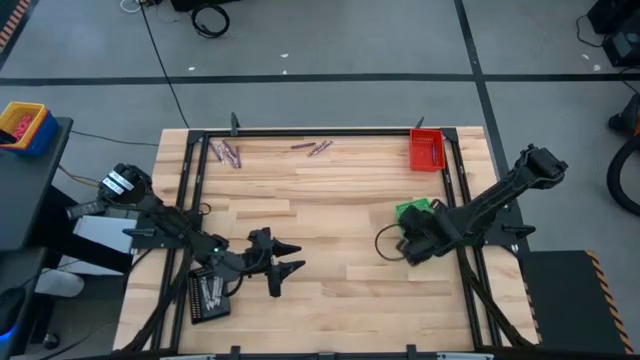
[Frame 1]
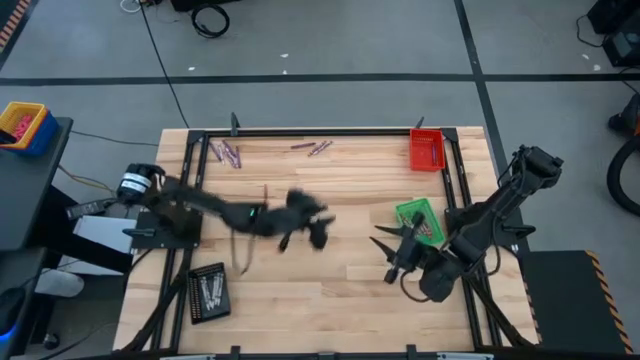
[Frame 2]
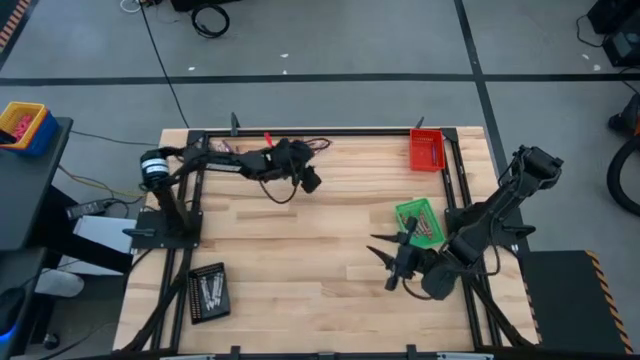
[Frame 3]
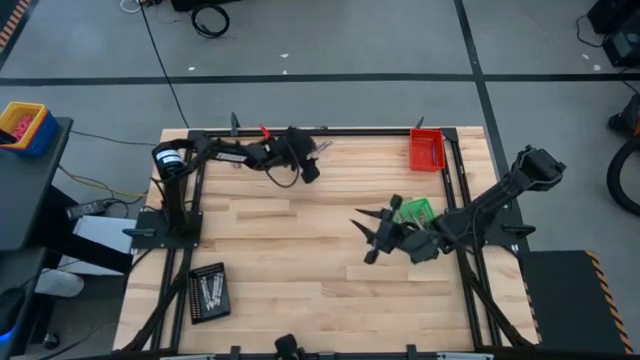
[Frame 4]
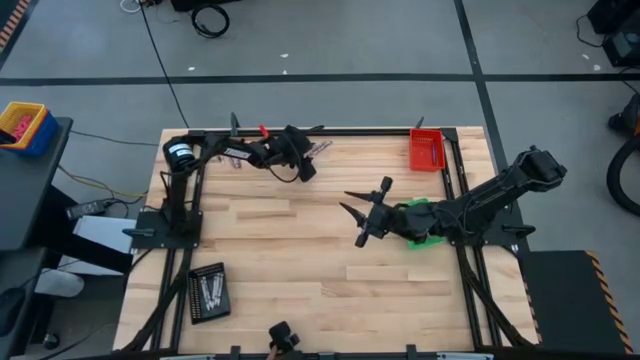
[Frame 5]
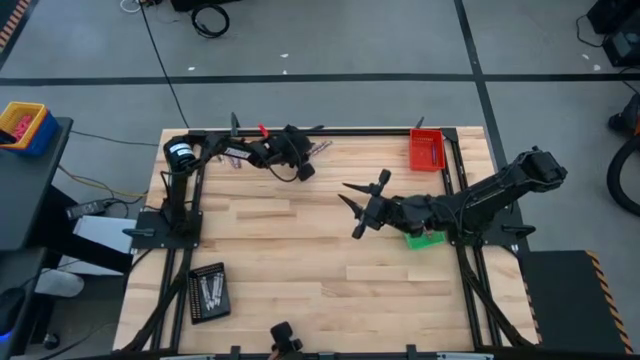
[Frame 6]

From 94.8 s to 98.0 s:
Task: Sort crayons
Put the pink crayon into the green bin

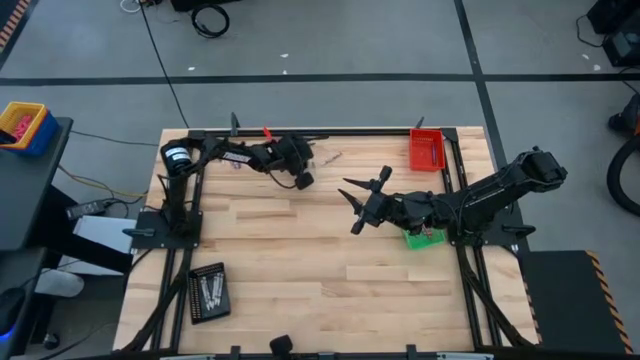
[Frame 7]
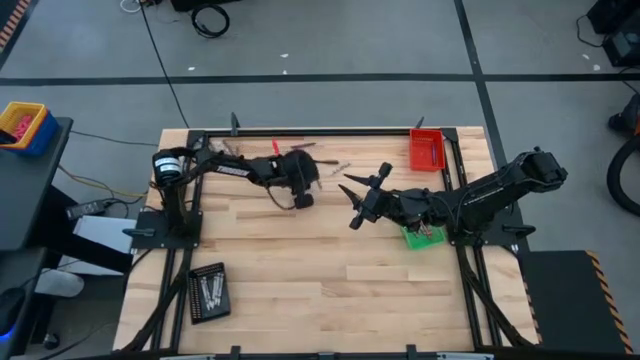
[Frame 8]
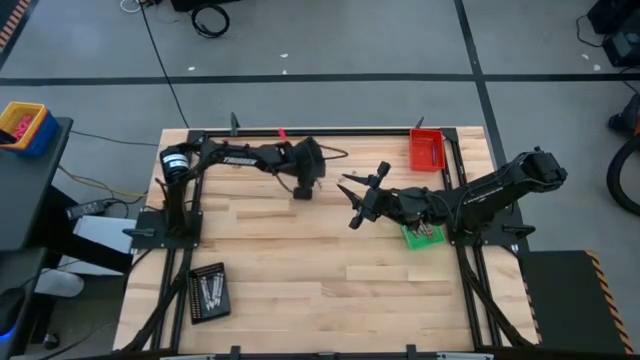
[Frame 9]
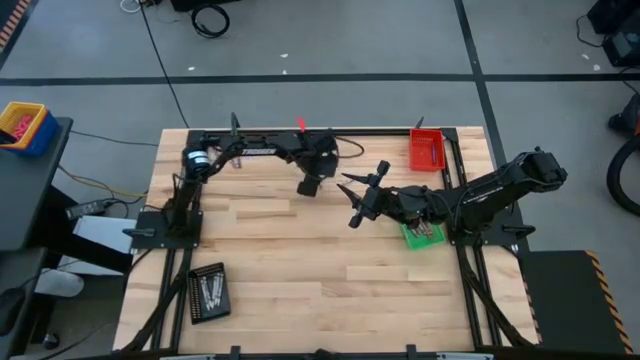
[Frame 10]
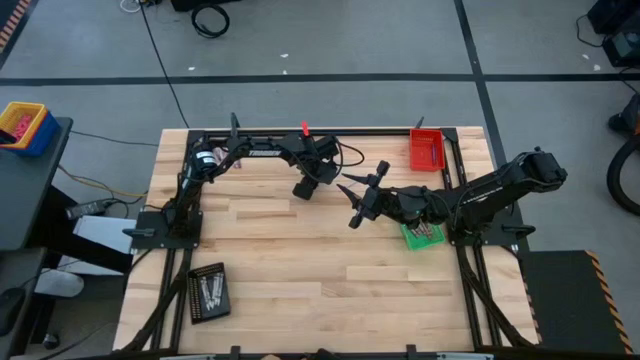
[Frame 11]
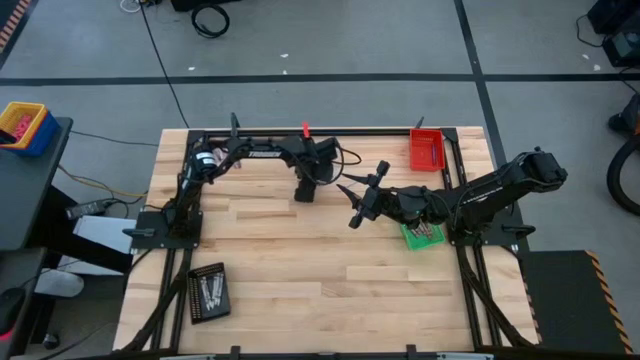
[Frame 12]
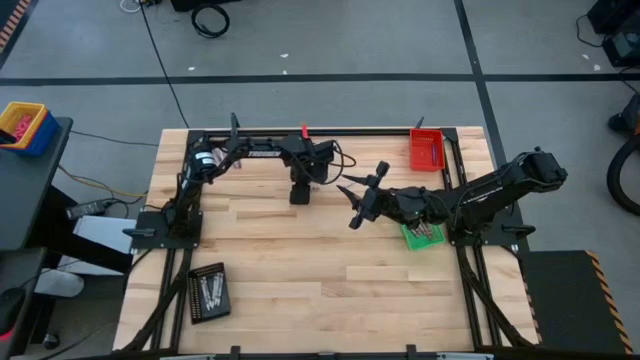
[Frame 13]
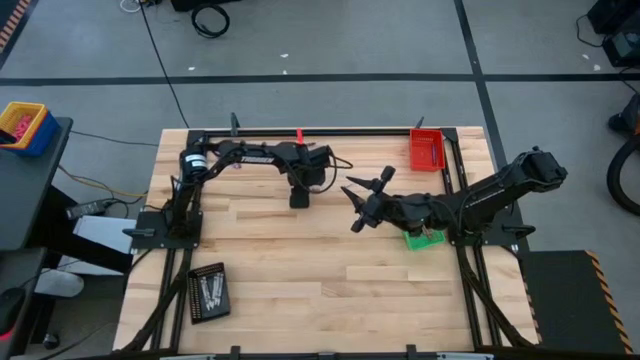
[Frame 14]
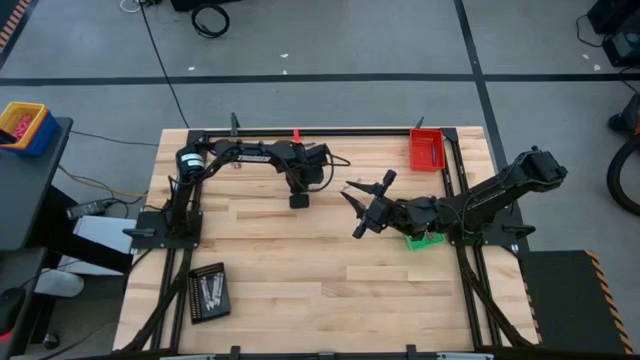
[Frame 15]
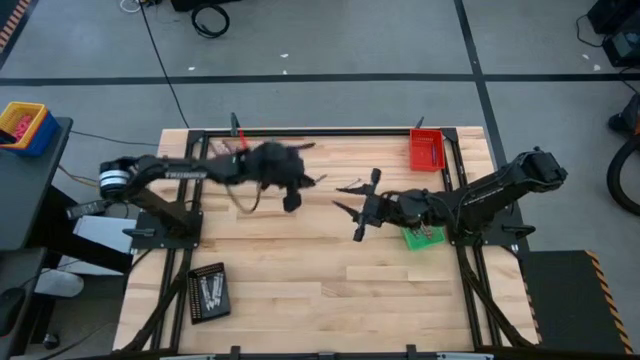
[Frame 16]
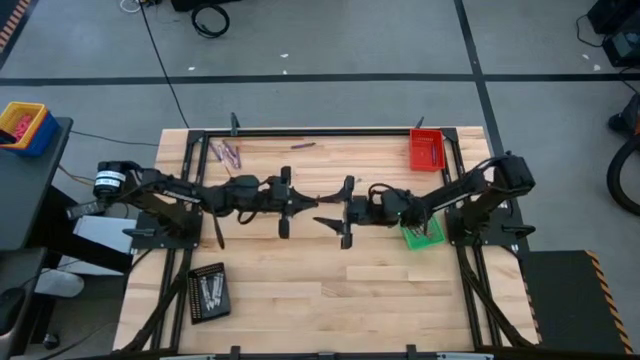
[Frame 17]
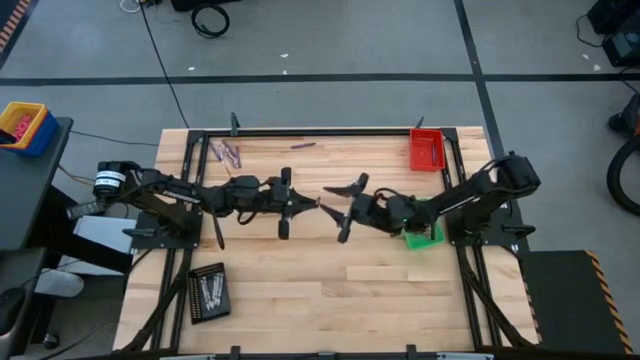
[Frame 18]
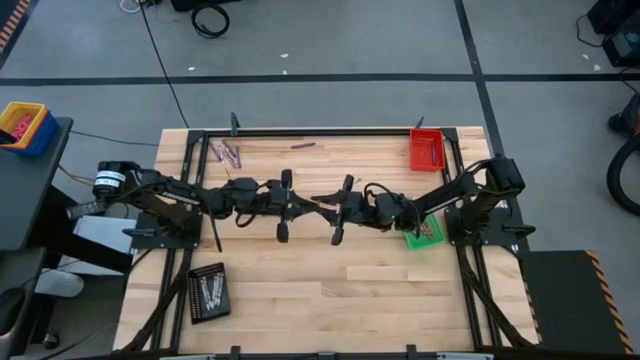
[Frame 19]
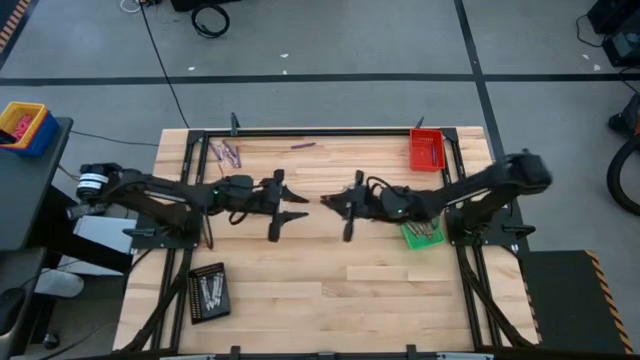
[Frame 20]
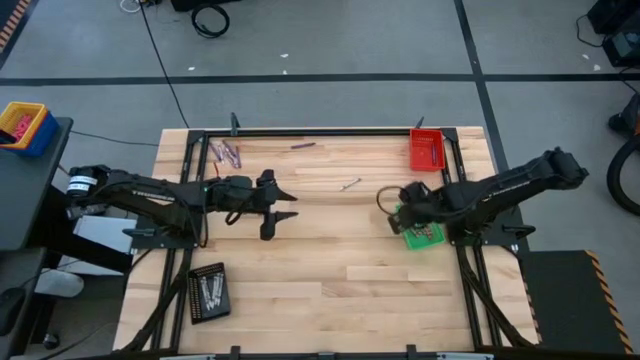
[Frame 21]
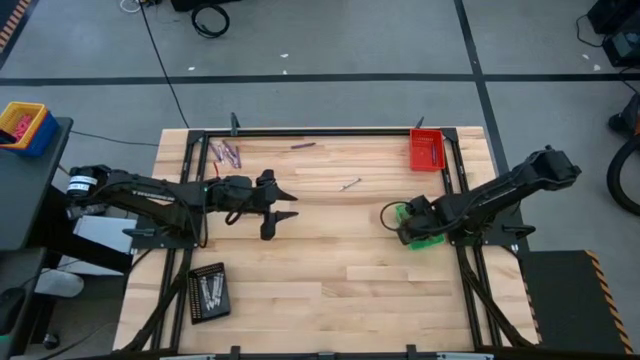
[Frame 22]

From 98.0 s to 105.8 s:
Put the pink crayon into the green bin

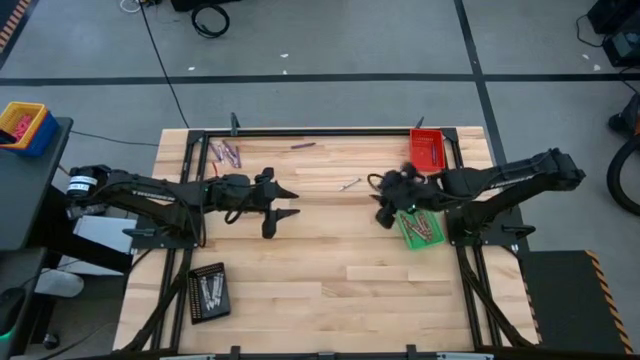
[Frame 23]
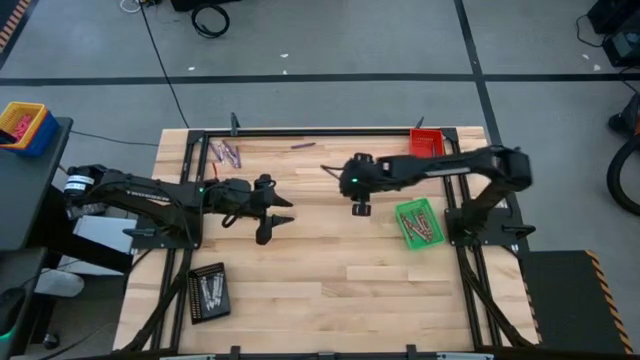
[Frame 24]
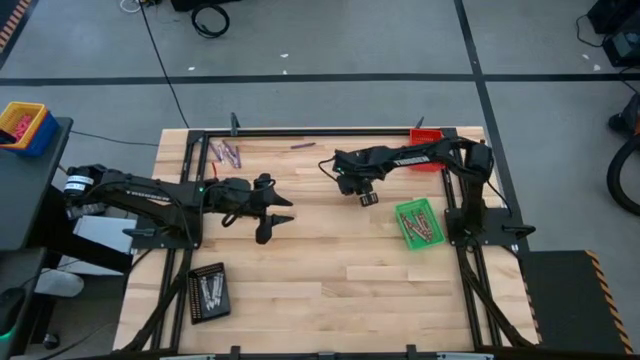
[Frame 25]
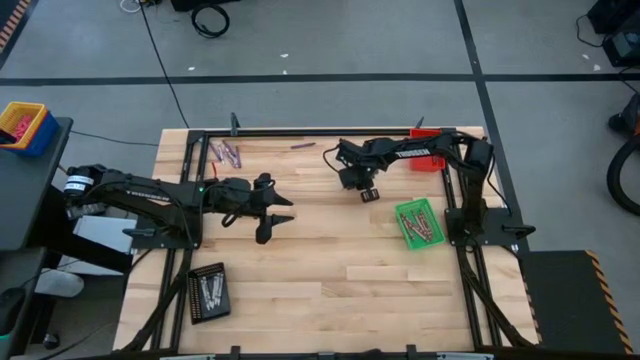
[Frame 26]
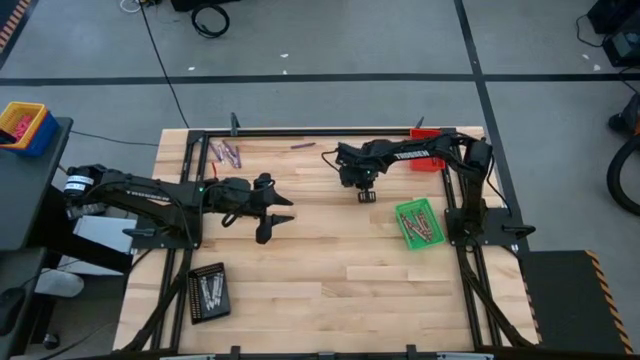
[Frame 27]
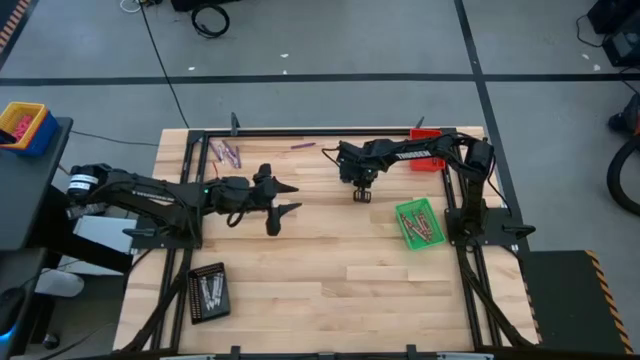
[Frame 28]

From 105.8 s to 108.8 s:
Put the white crayon into the black bin

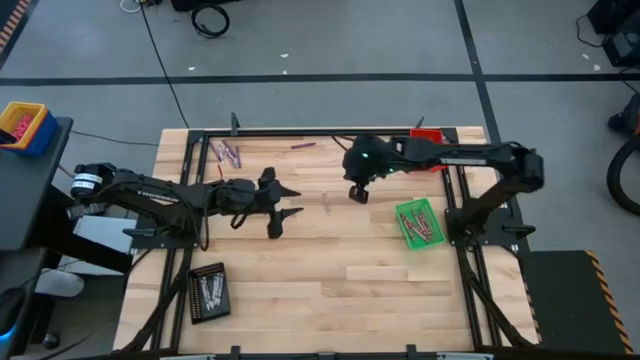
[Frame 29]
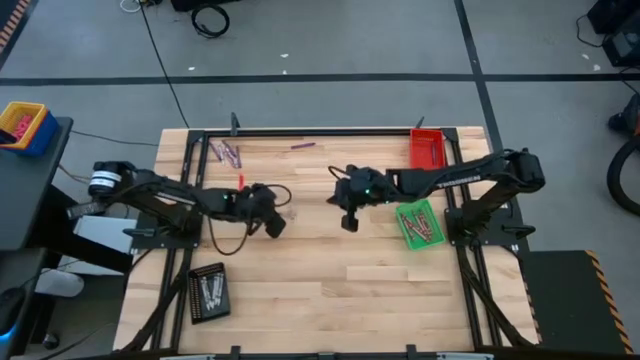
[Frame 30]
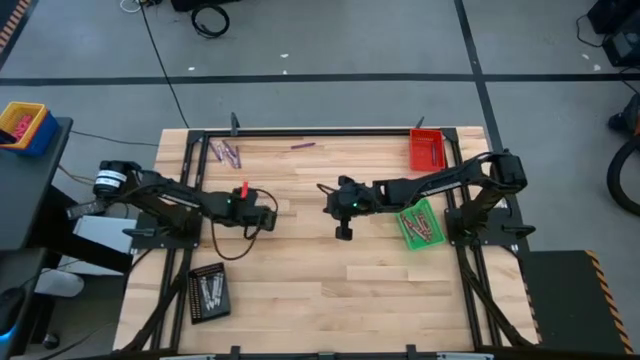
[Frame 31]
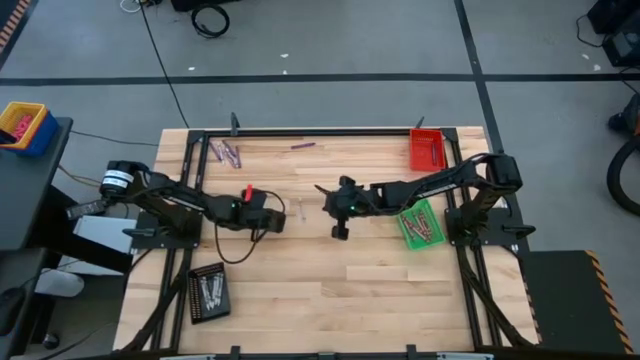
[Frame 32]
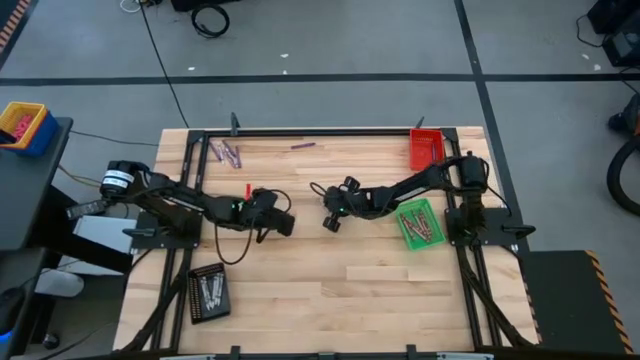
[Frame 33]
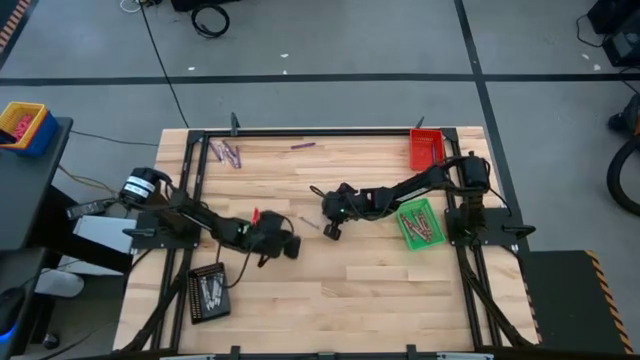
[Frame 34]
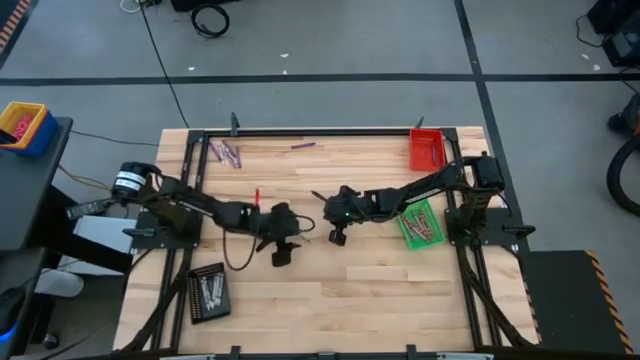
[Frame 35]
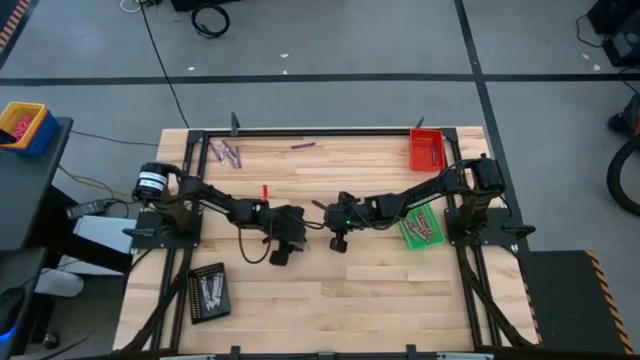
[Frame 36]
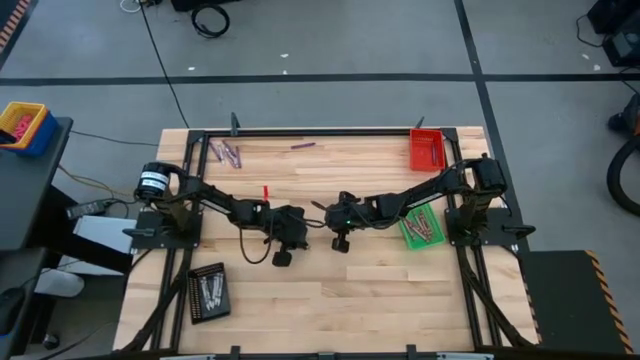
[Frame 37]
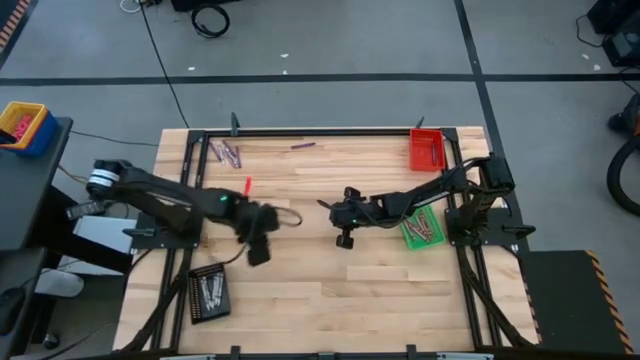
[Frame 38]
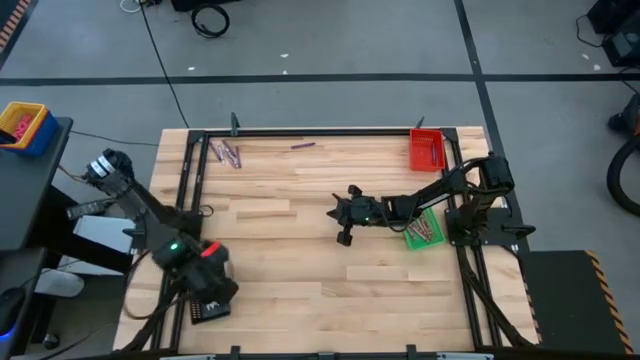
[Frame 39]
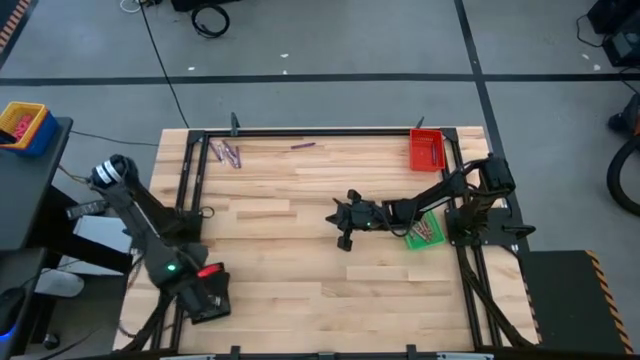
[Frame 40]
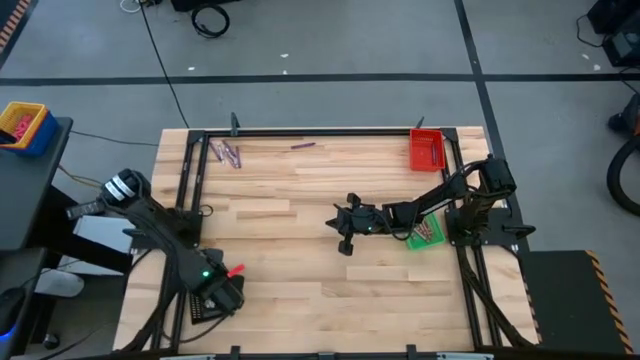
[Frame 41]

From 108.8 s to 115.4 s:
Put the white crayon into the black bin
